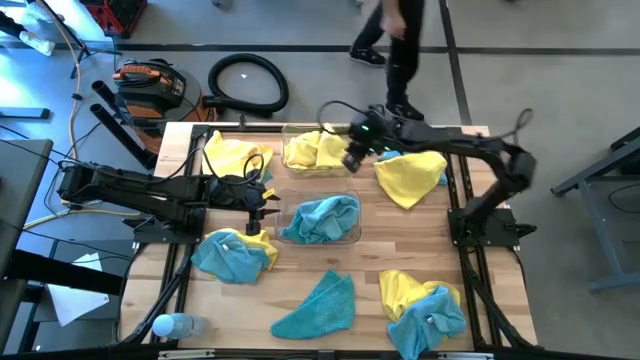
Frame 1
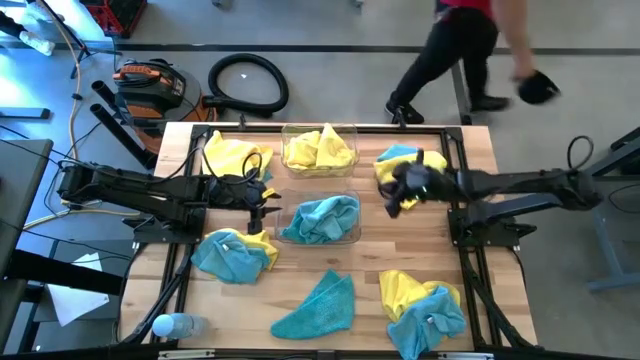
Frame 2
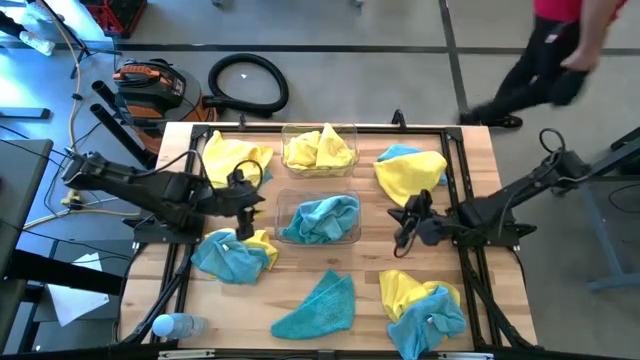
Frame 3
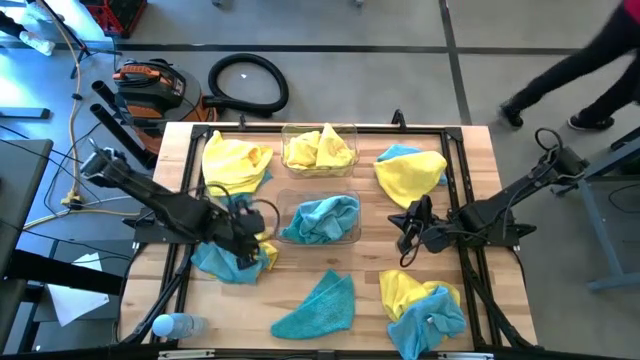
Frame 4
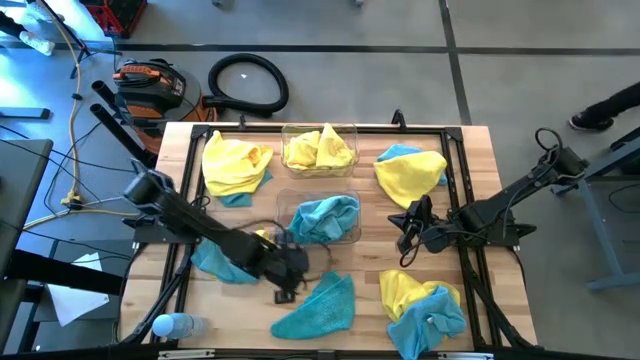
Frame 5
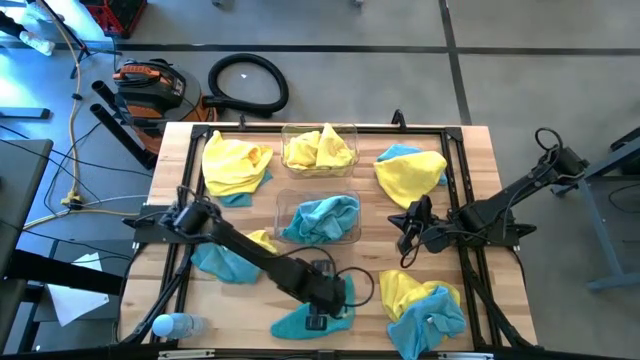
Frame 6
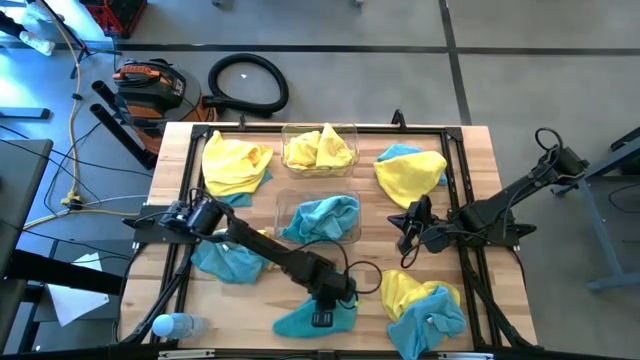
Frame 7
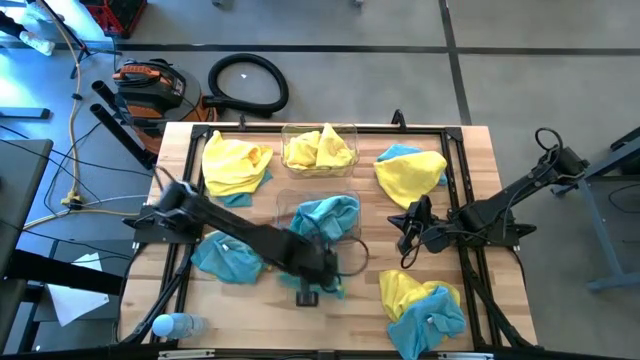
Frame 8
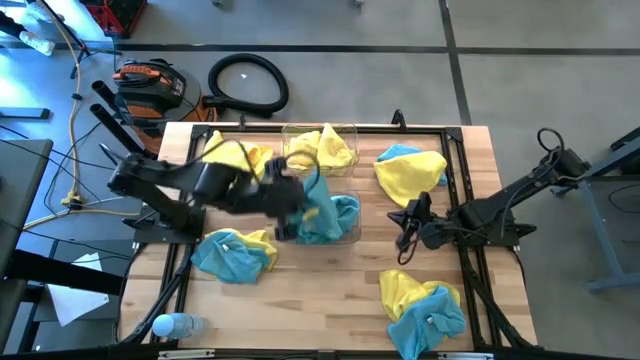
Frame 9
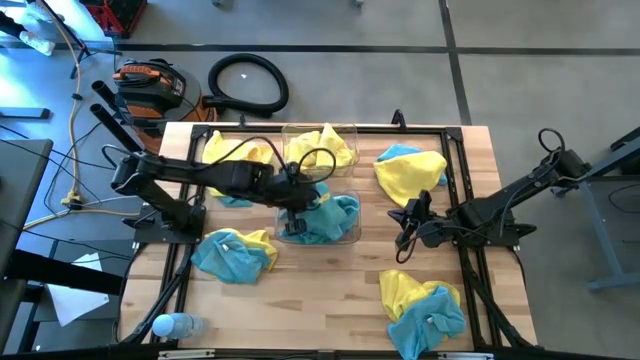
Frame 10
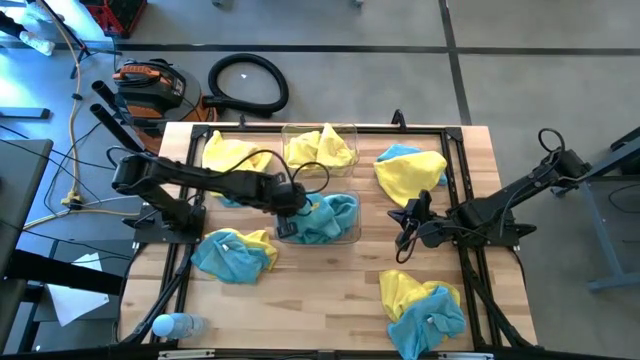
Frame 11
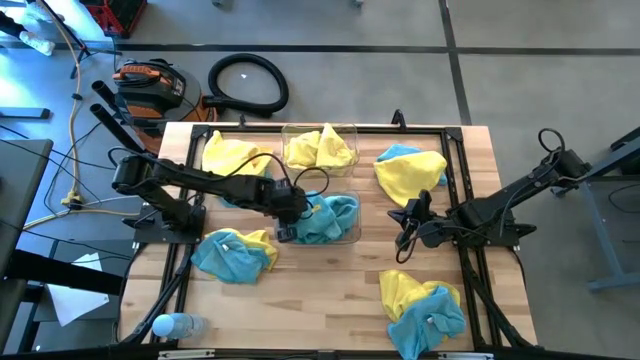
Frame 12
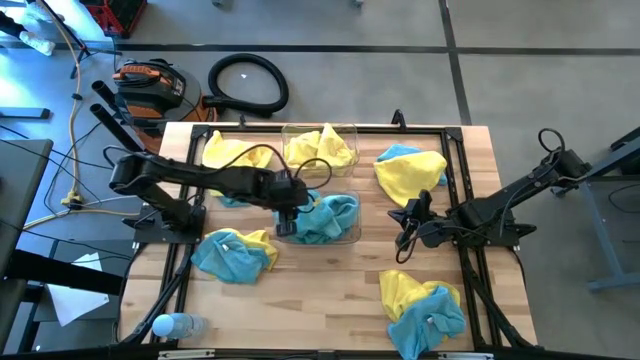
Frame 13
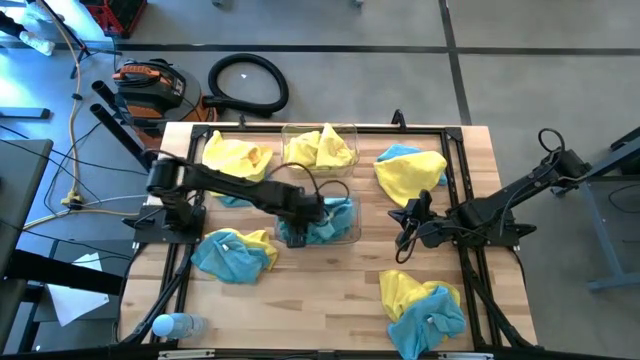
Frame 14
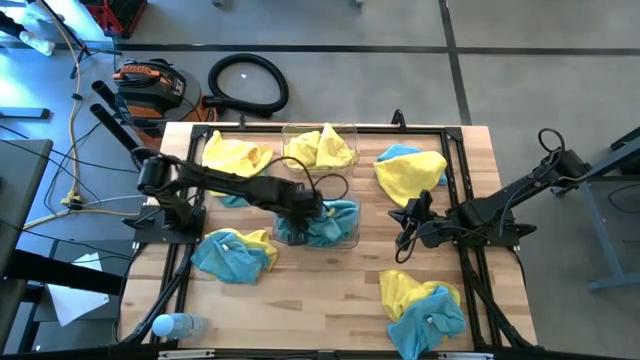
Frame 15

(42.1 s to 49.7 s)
Task: Sort microfiber towel by color & place in baskets
Put the blue microfiber towel into the bottom transparent bin

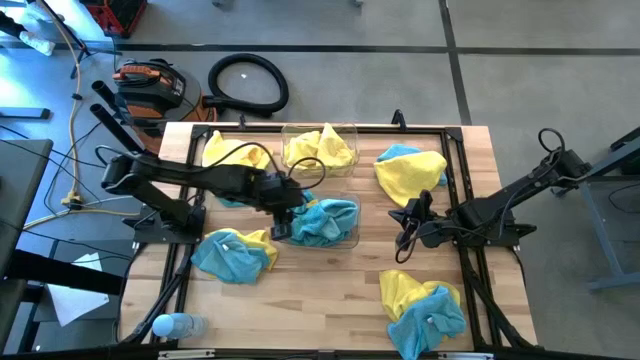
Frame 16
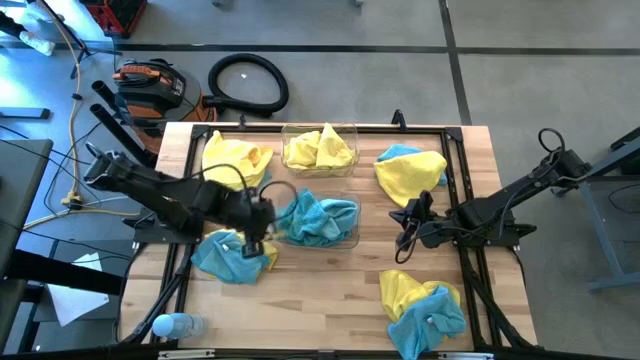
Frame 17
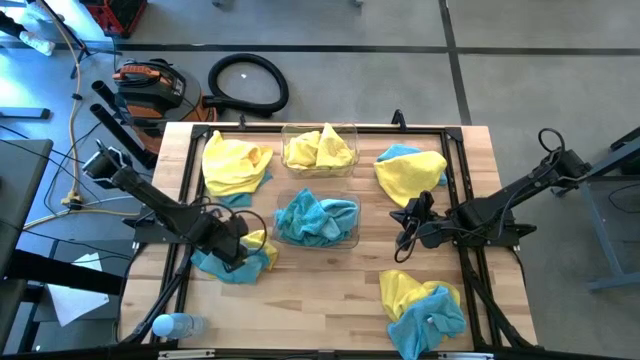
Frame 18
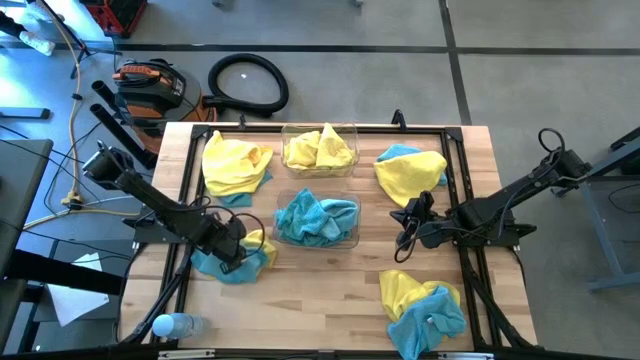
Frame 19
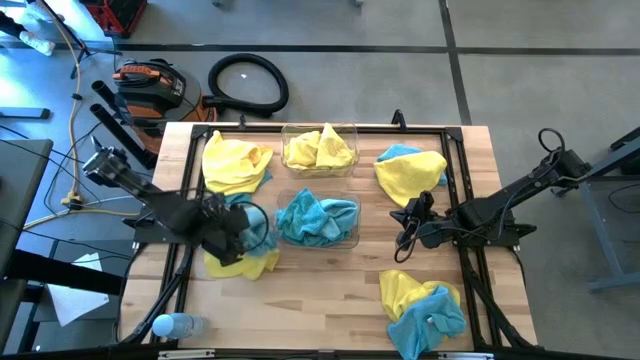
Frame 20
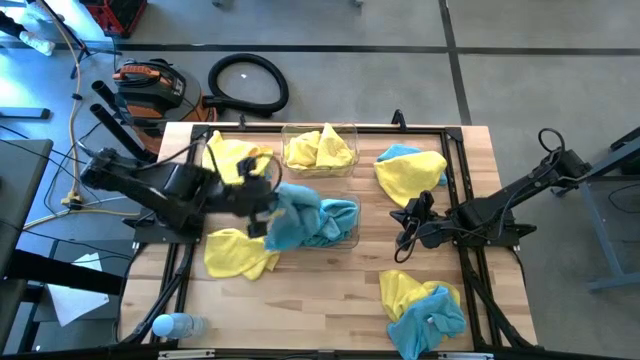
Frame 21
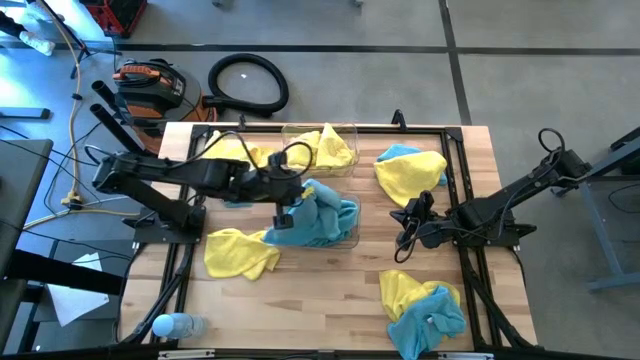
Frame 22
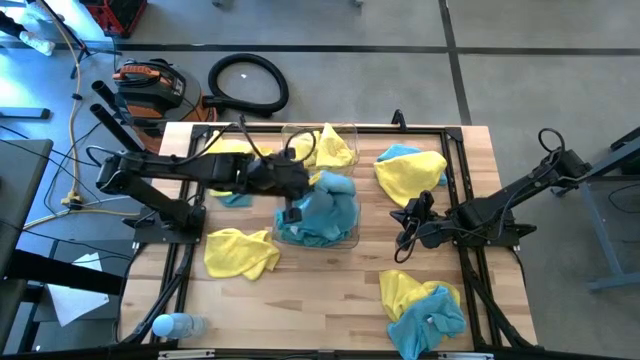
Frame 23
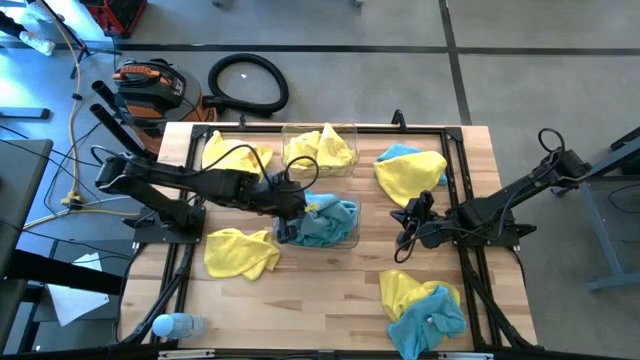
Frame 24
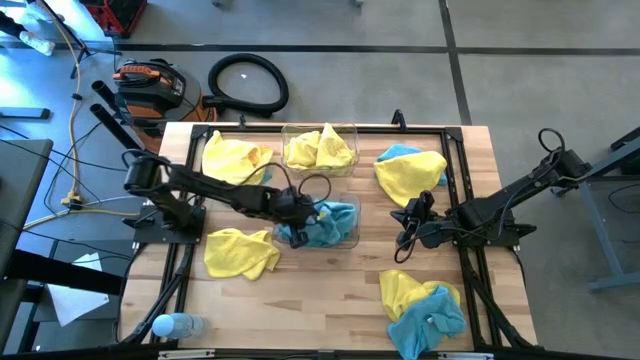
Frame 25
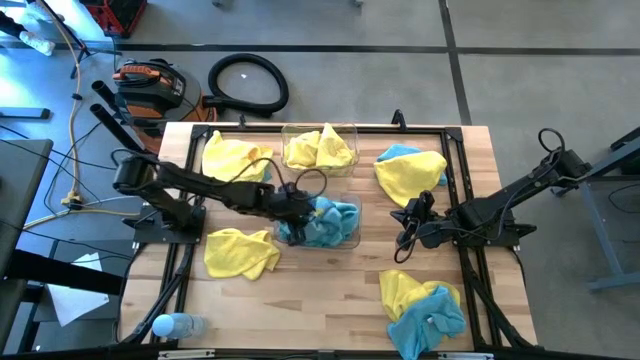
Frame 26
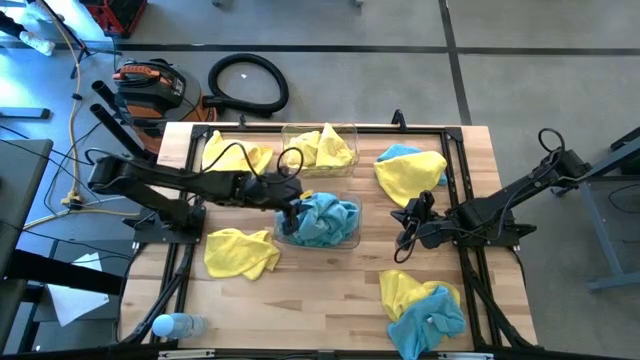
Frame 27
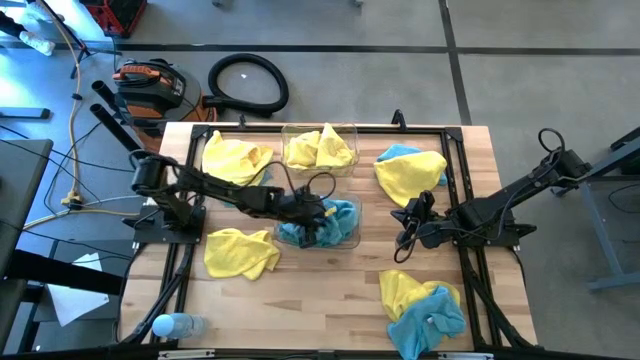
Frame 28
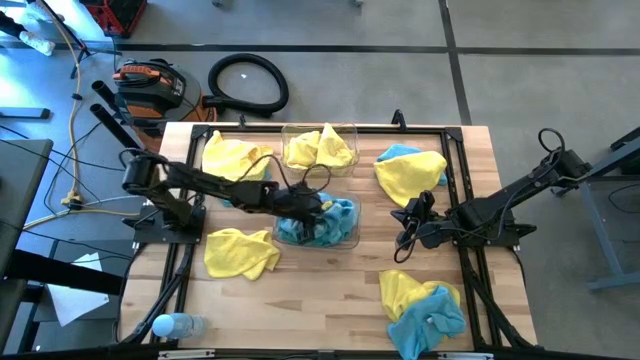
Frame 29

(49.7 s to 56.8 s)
Put the blue microfiber towel into the bottom transparent bin

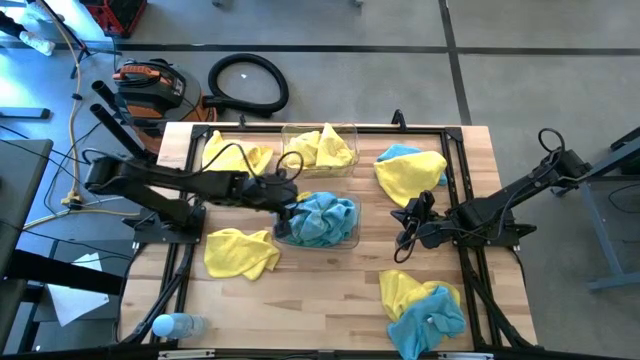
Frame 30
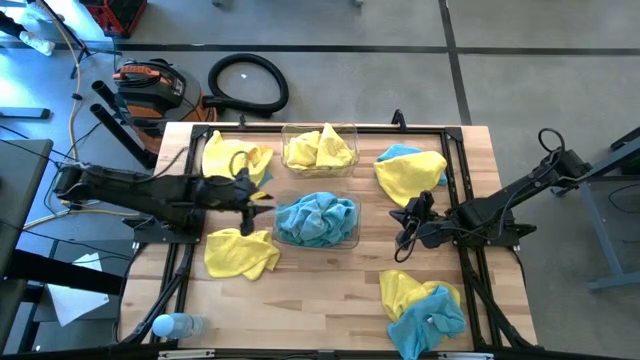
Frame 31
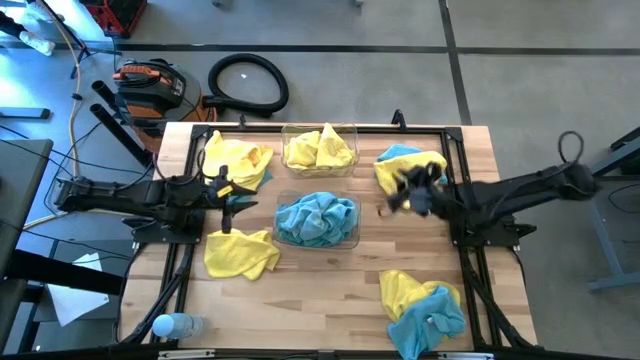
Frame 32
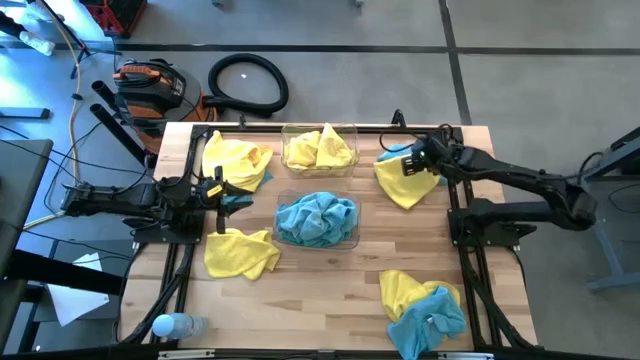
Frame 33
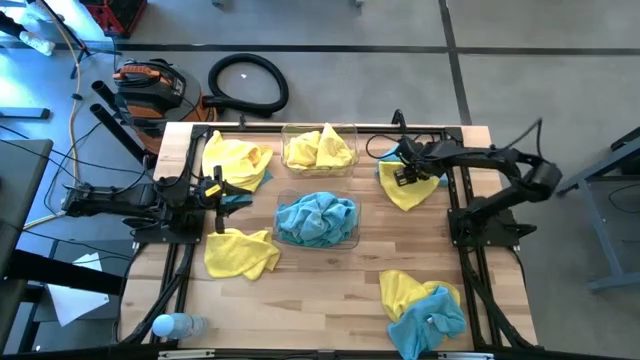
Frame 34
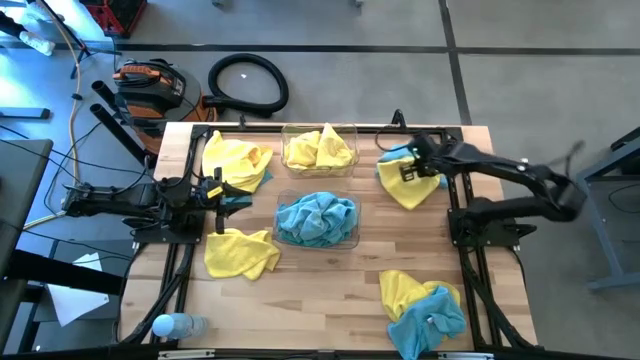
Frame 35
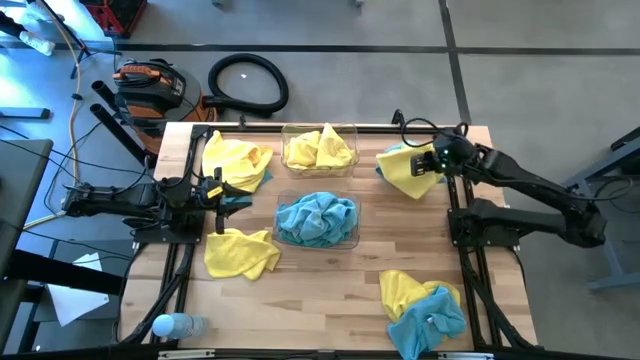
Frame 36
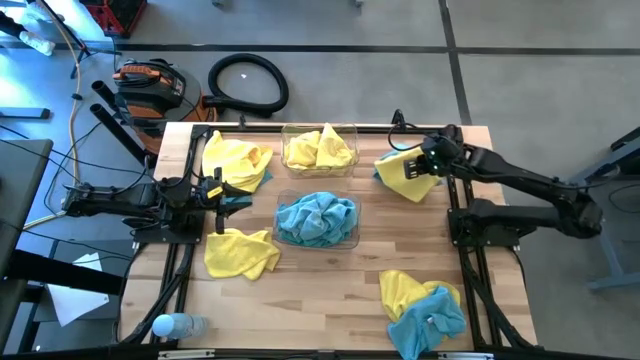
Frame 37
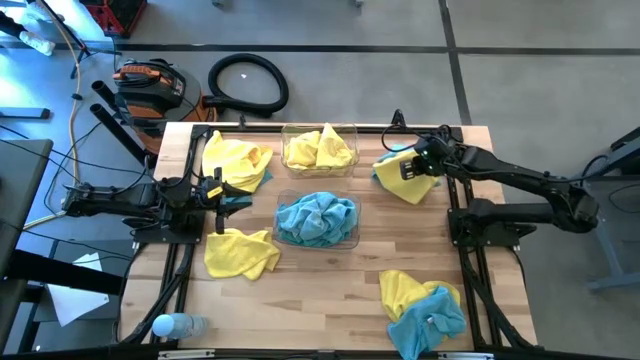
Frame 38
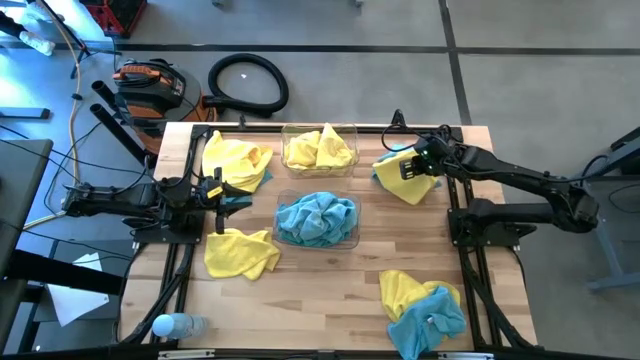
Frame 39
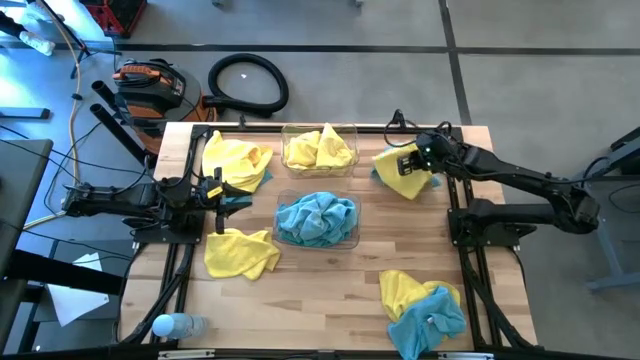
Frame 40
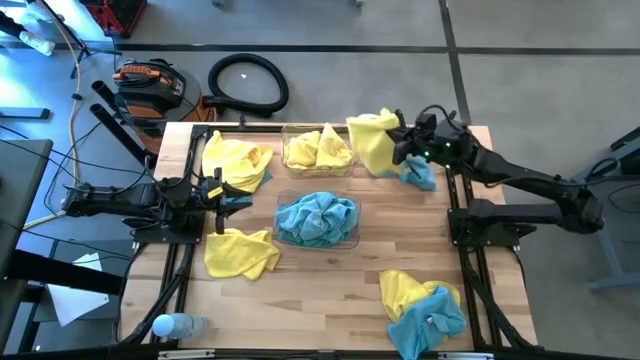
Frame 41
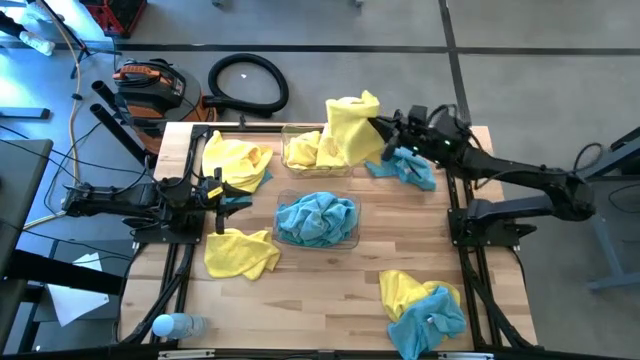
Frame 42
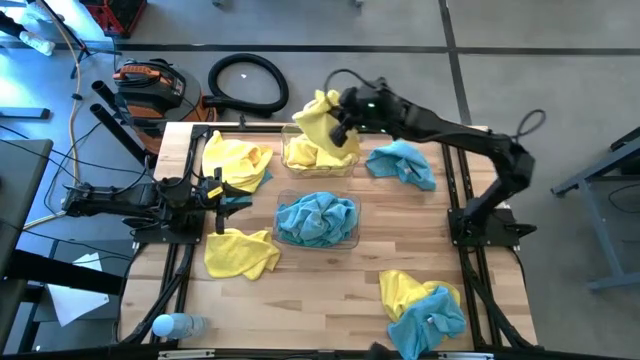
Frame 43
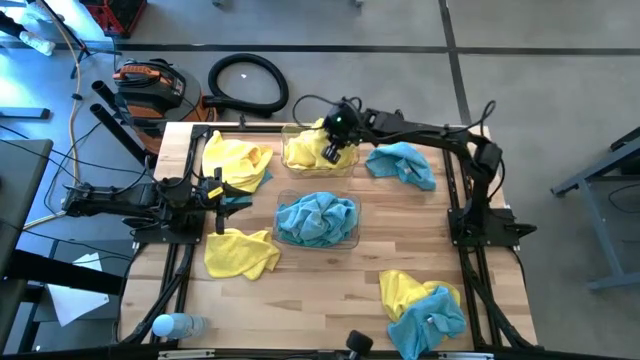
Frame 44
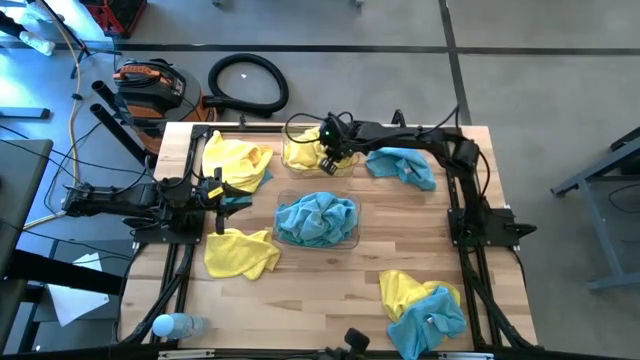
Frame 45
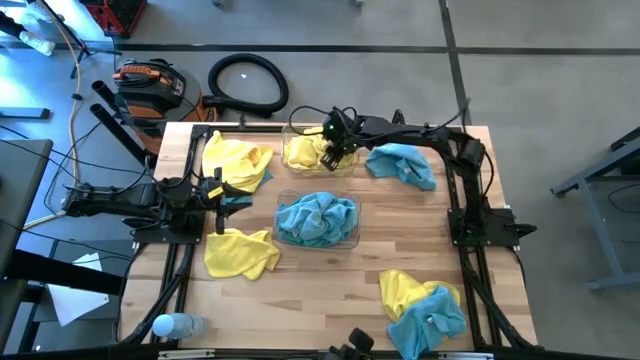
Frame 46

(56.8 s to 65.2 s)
Put the yellow microfiber towel into the top transparent bin
